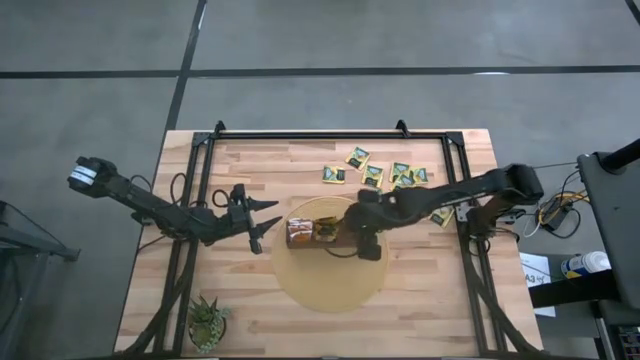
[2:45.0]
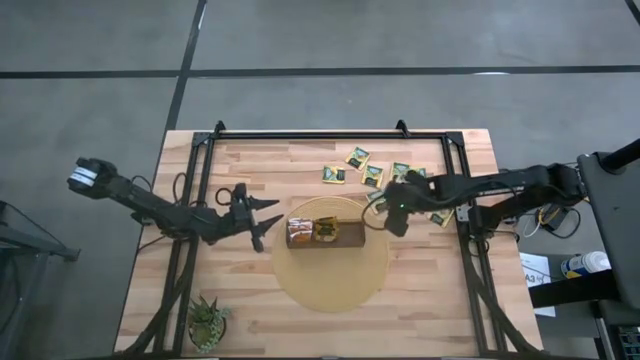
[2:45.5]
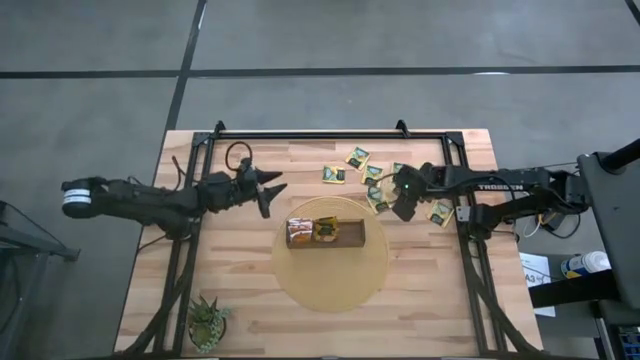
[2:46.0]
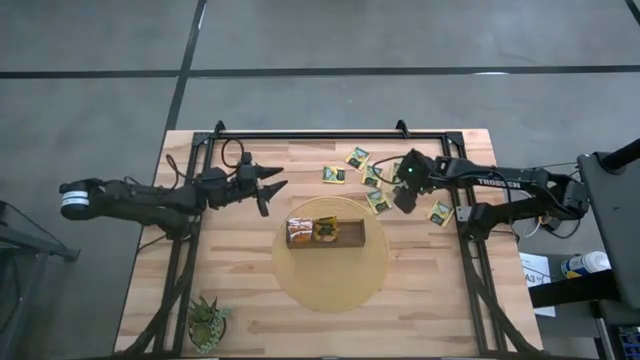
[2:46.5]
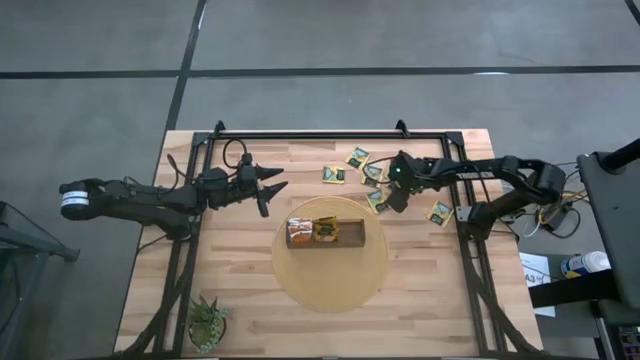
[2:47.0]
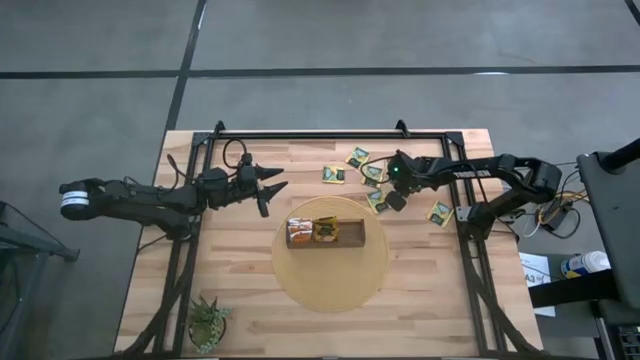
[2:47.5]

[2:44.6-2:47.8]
Task: Pick & Place Tea
Put the yellow tea bag into the right section of the wooden organizer

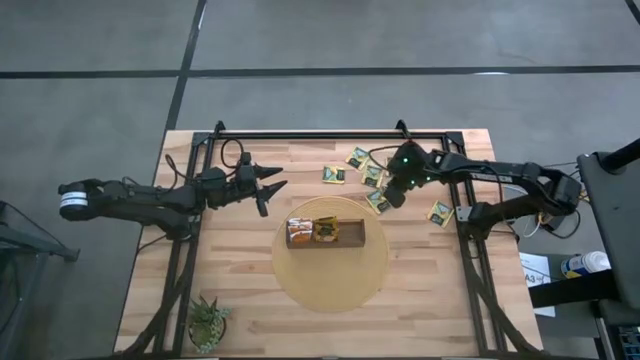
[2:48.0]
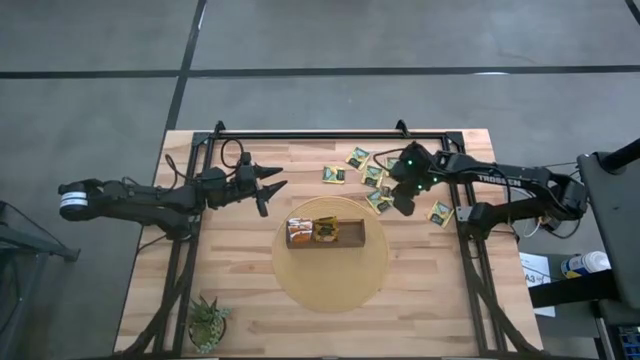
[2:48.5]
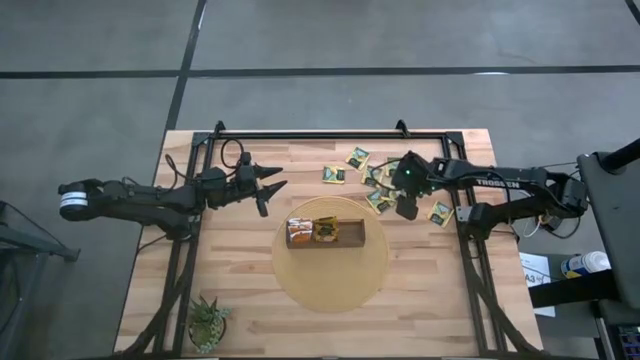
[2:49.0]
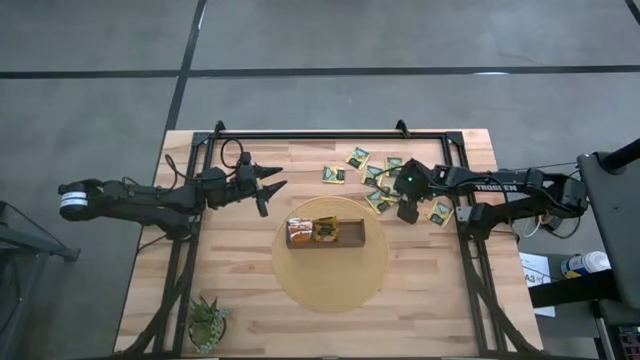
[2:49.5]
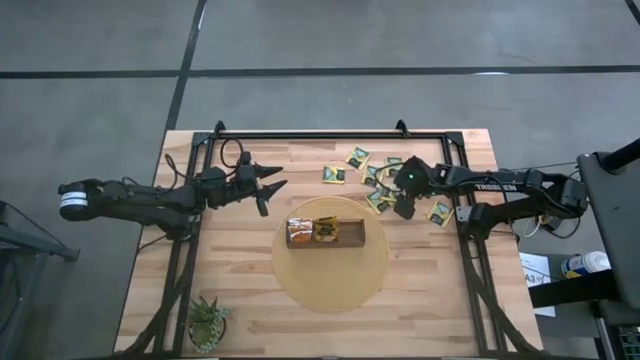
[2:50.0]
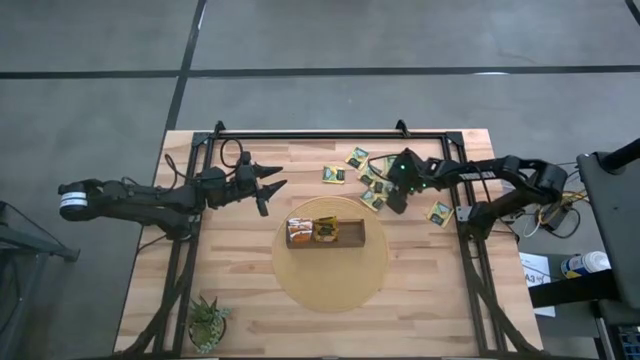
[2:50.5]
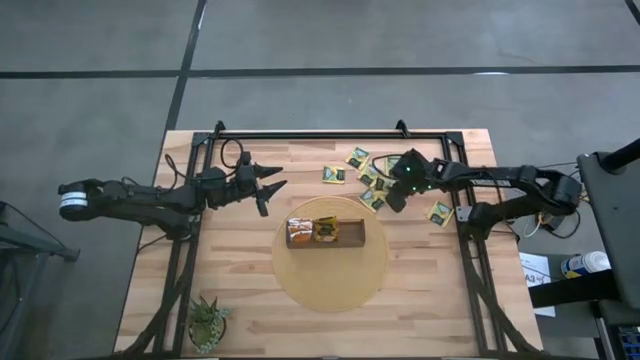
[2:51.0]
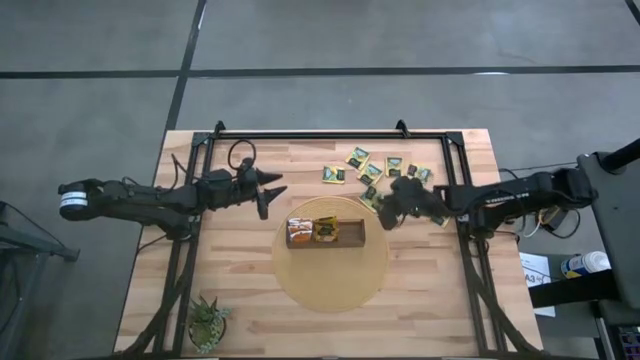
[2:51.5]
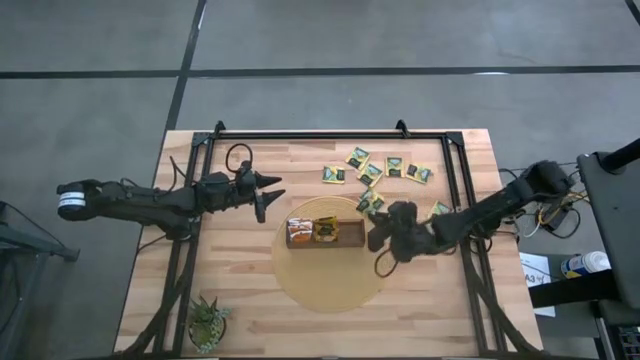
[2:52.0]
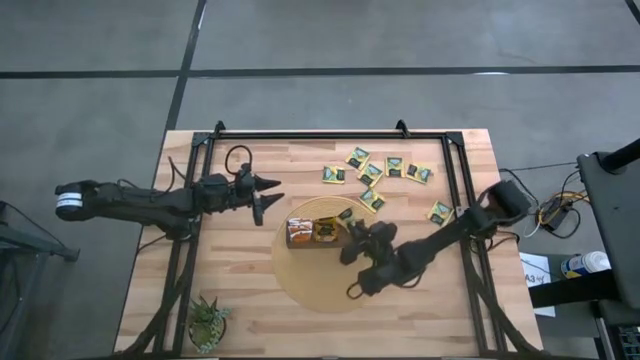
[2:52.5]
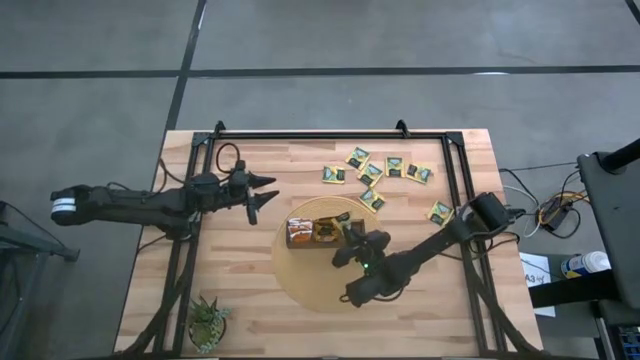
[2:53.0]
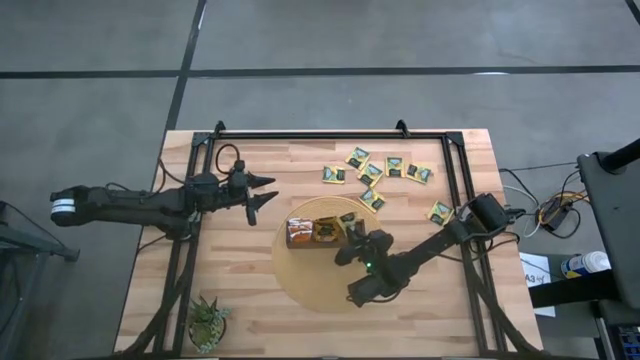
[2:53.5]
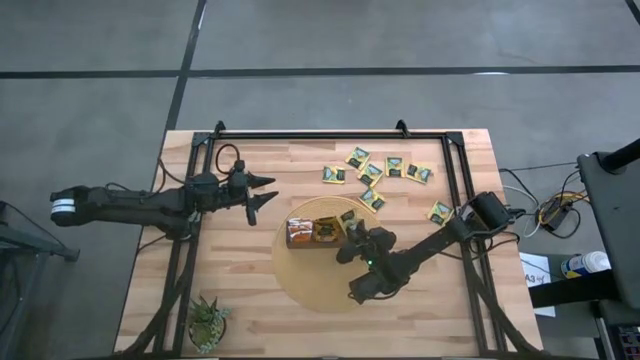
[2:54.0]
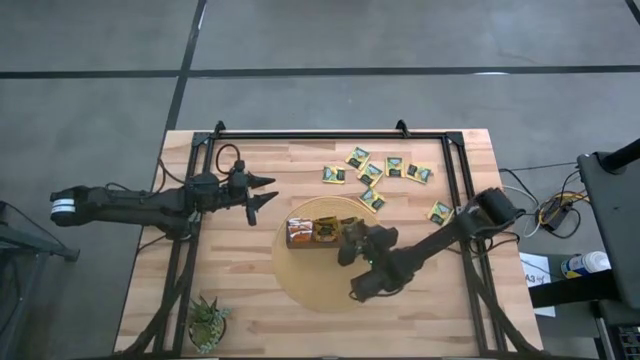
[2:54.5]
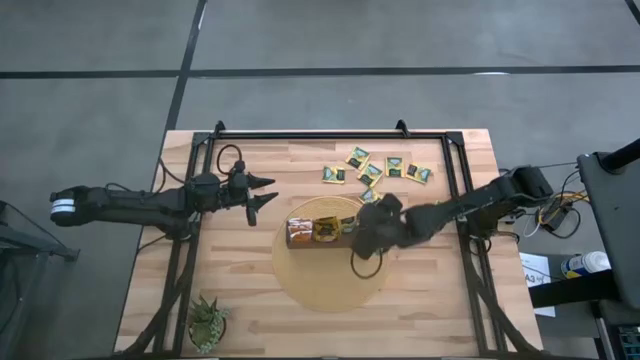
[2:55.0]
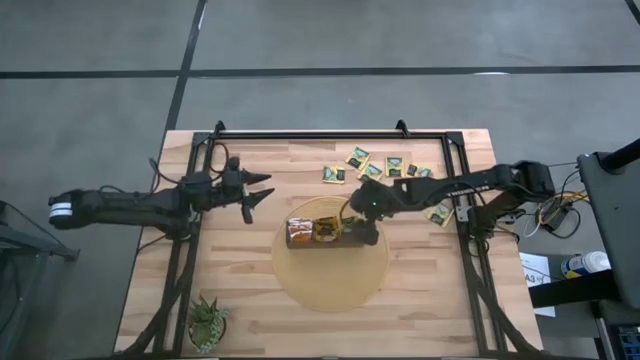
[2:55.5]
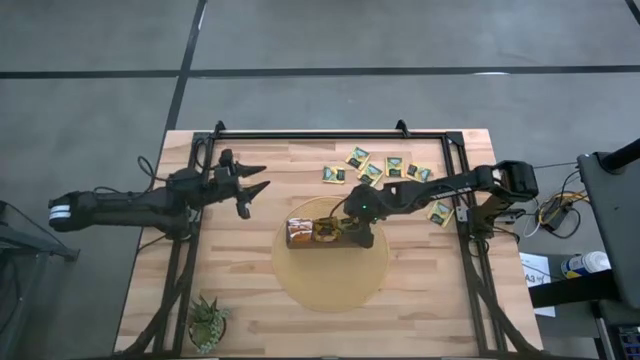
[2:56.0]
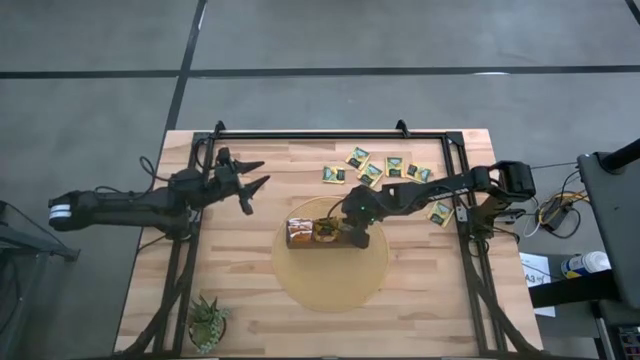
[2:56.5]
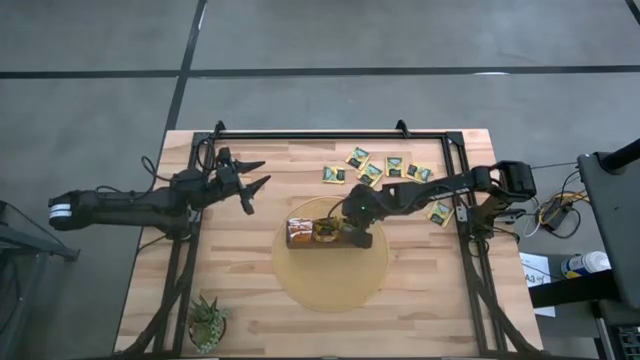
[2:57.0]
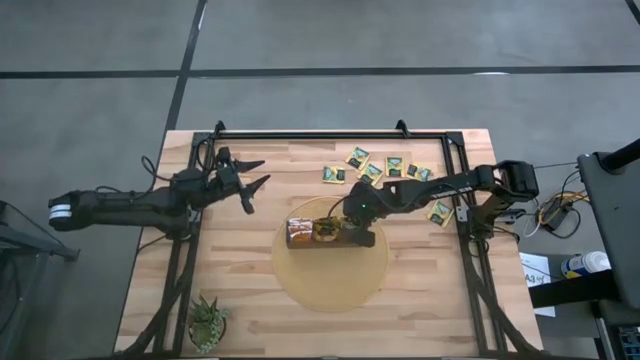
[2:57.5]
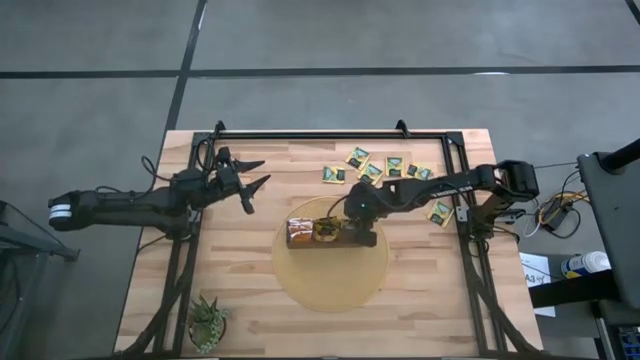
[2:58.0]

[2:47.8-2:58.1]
Put the yellow tea bag into the right section of the wooden organizer

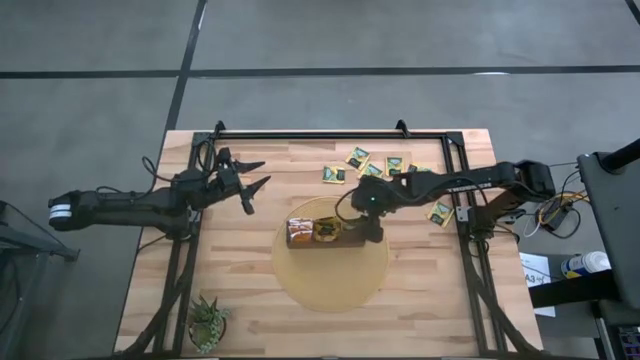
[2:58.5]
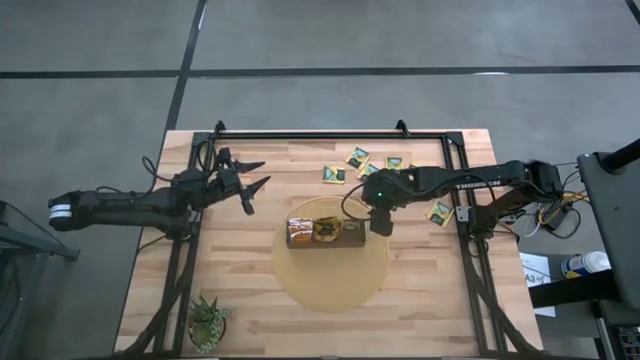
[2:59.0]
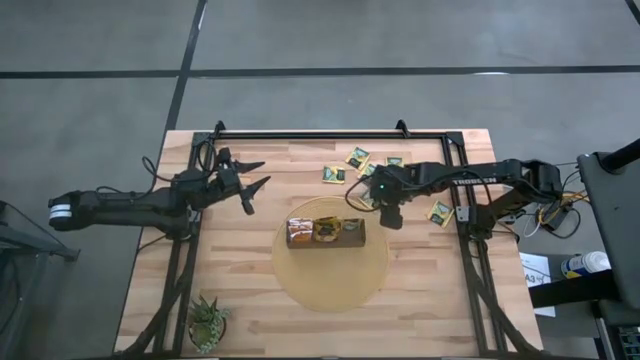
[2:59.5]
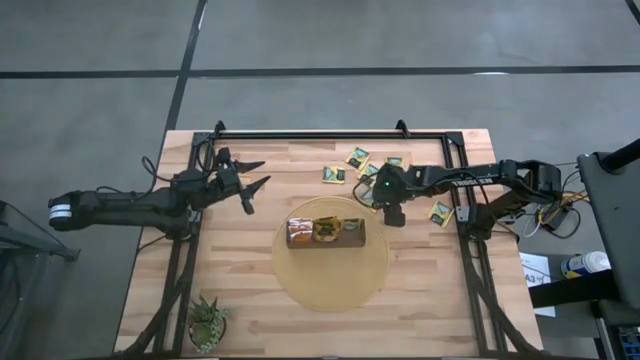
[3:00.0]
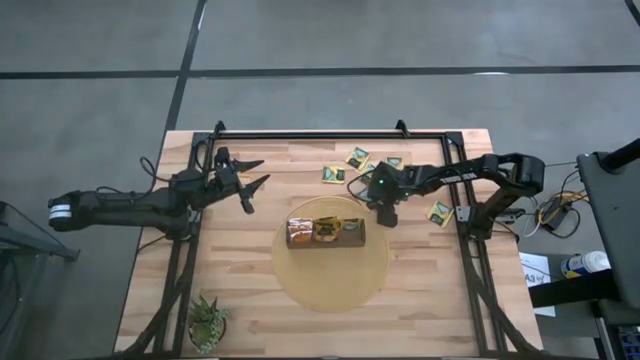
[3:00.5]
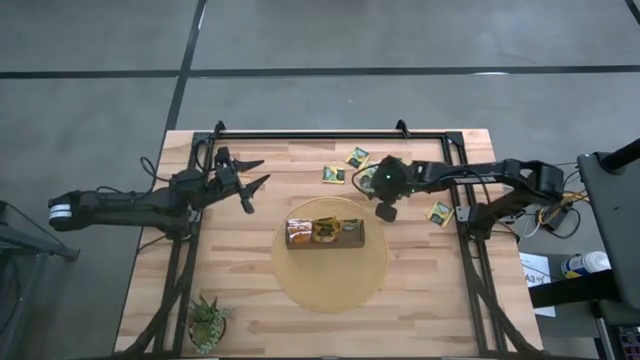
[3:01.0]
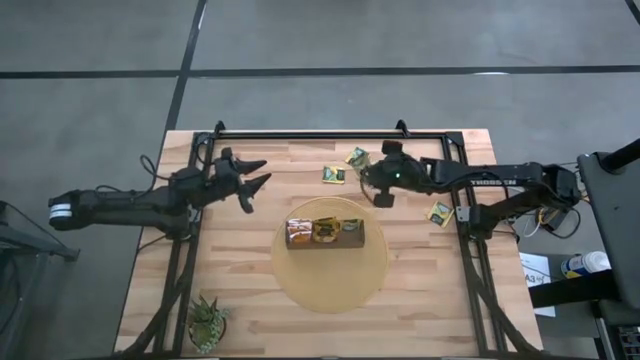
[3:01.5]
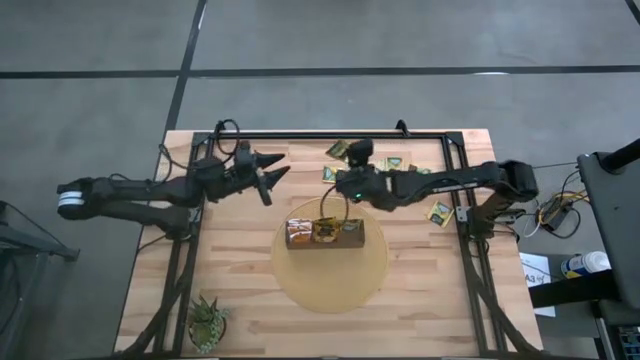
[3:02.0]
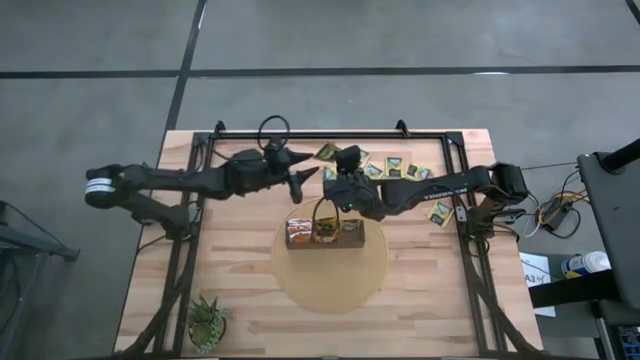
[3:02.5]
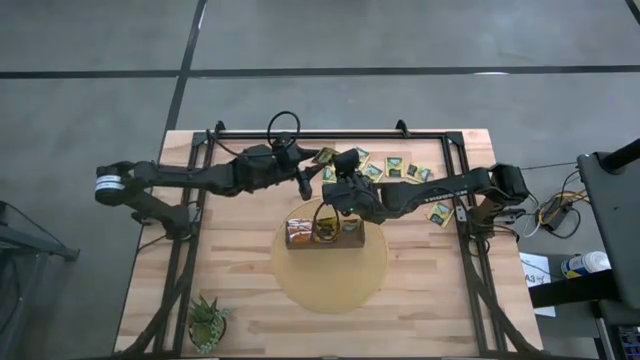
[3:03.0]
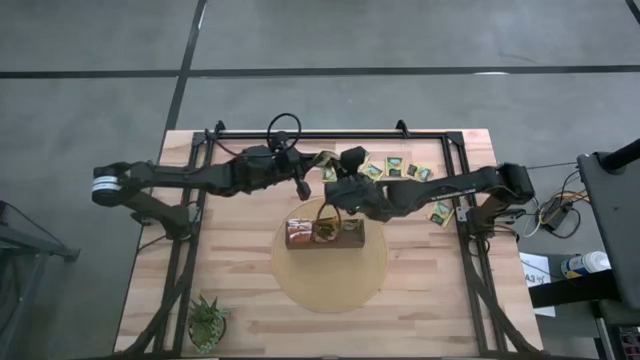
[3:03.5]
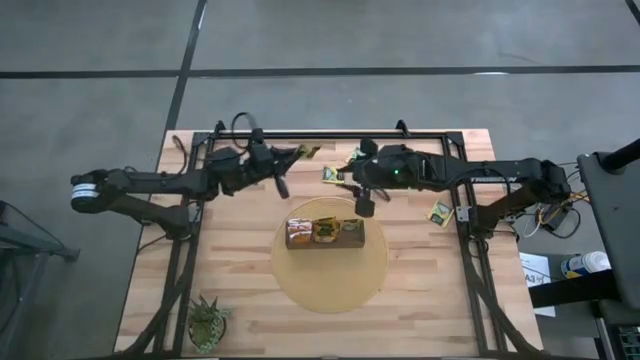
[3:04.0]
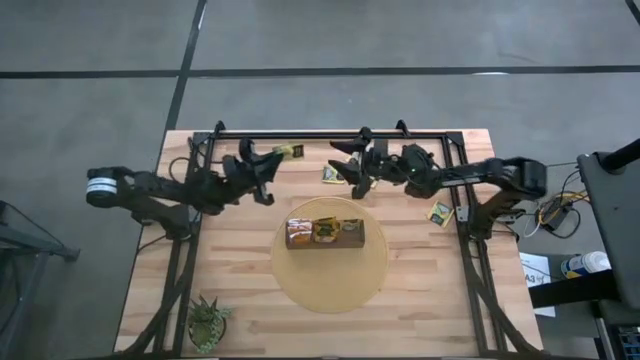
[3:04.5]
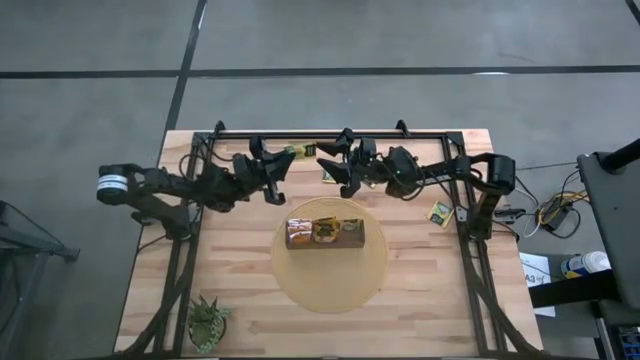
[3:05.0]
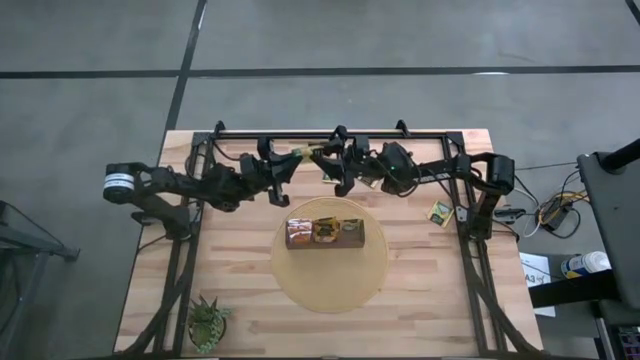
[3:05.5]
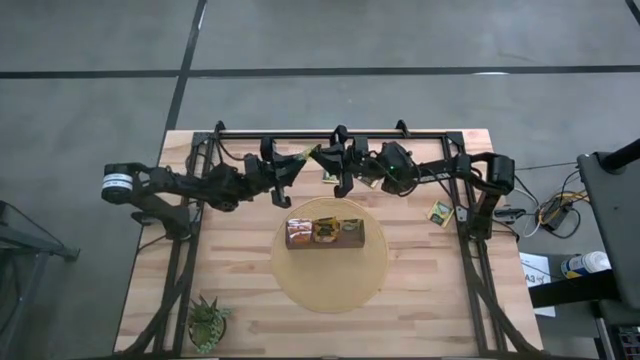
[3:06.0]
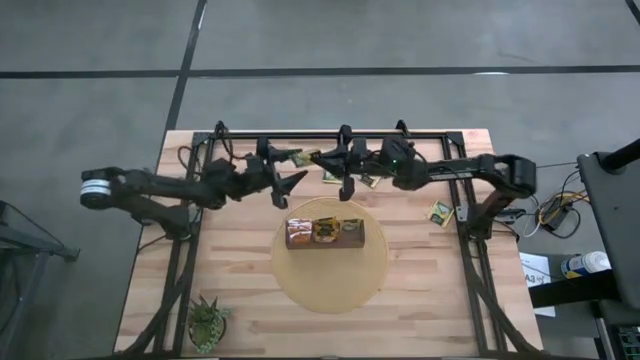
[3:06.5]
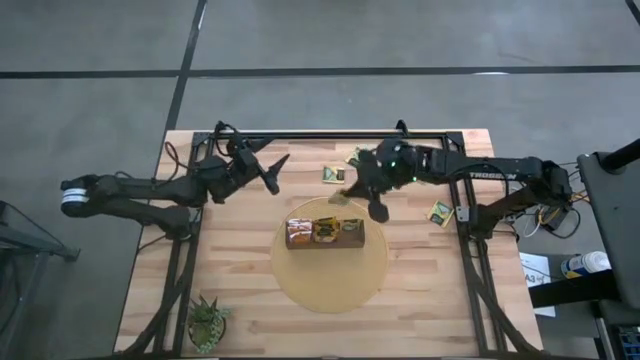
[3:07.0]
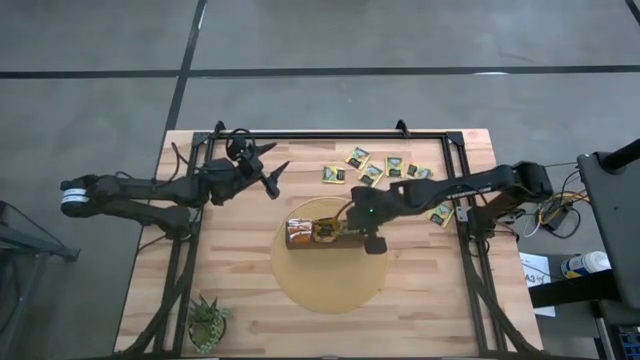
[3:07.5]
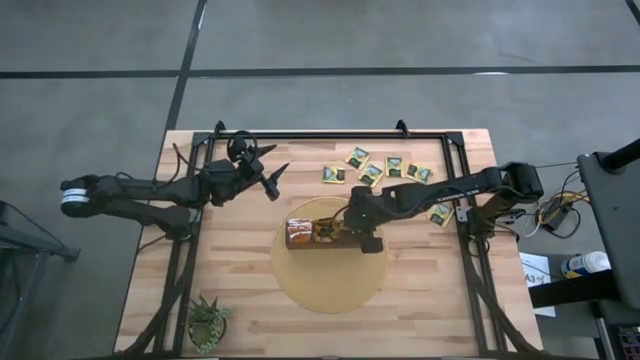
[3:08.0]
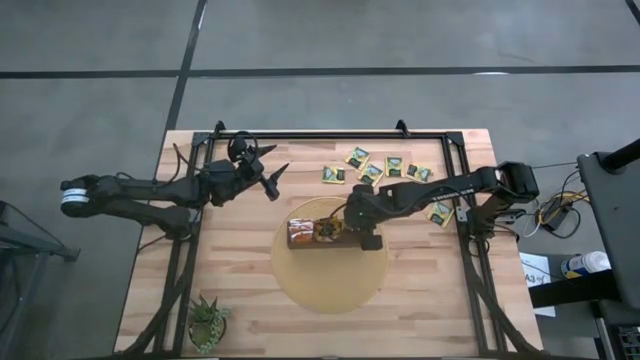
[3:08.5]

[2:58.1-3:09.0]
Put the yellow tea bag into the right section of the wooden organizer
